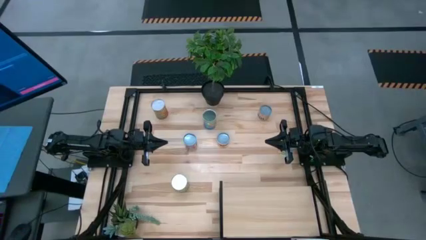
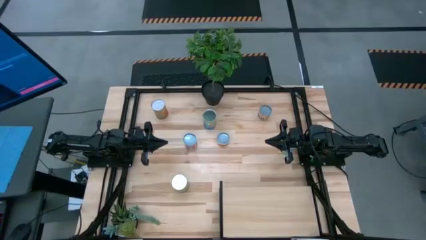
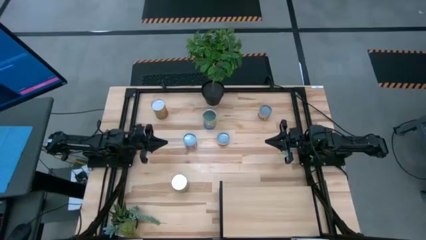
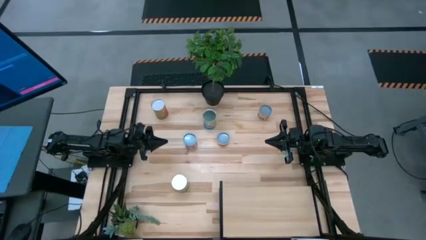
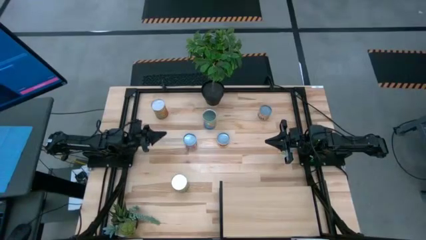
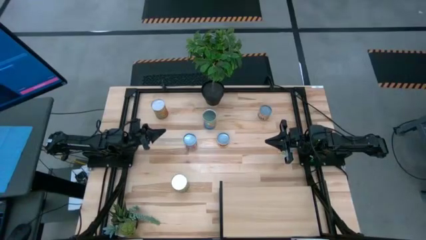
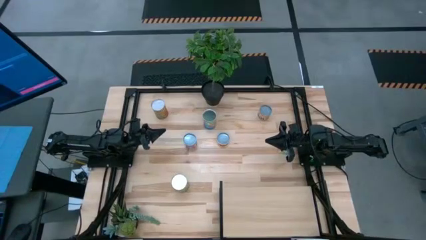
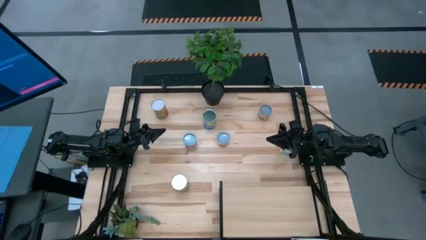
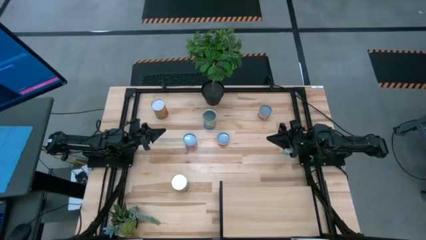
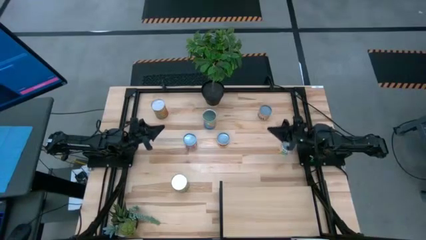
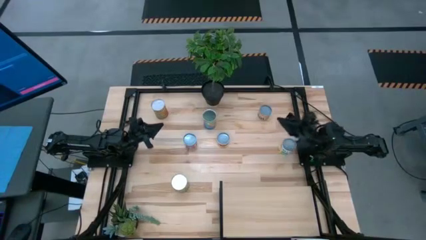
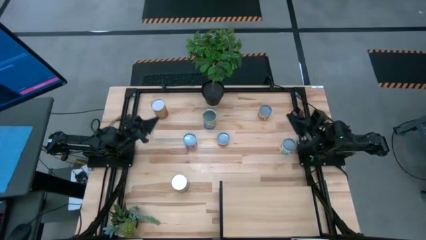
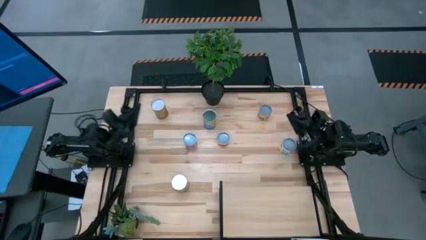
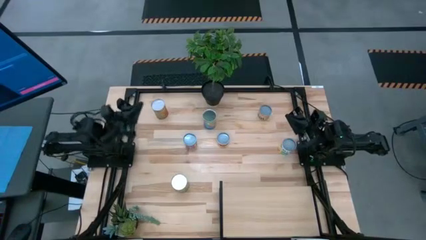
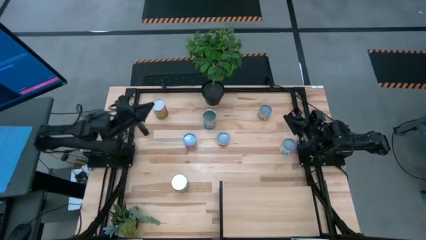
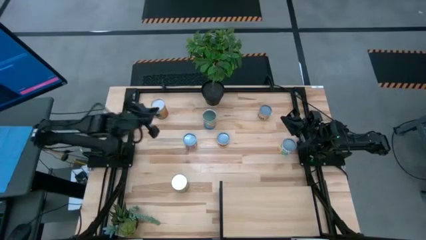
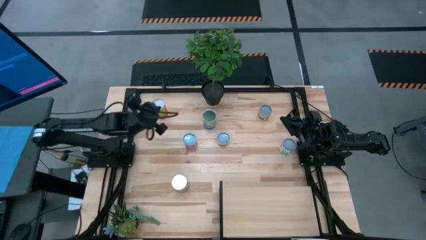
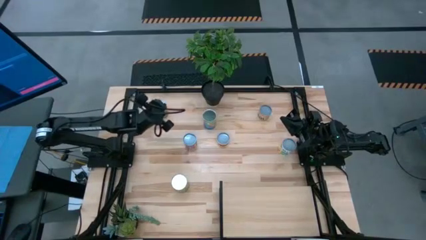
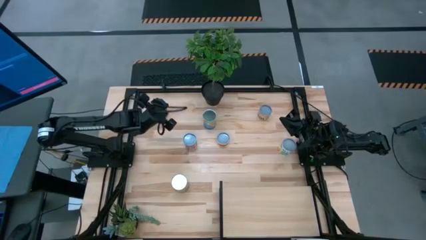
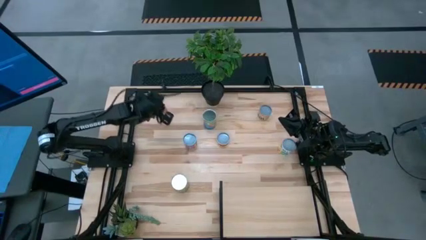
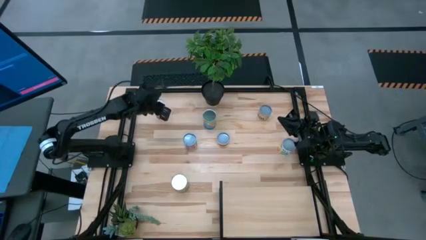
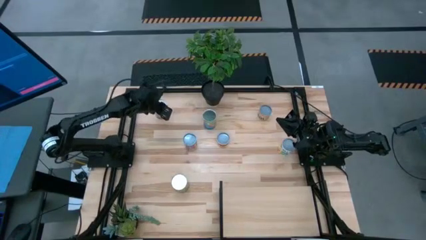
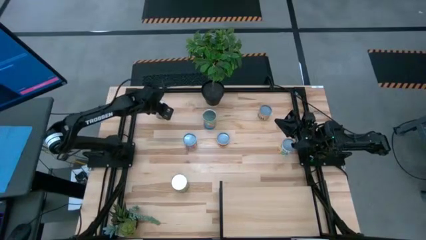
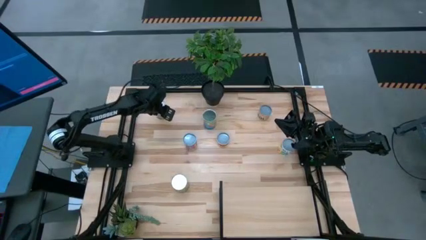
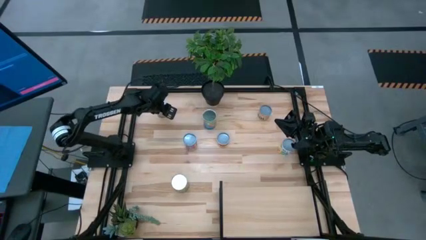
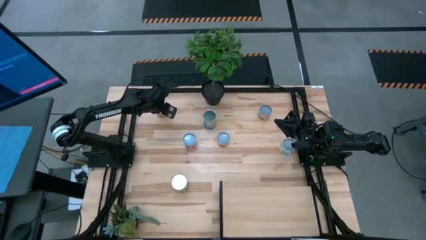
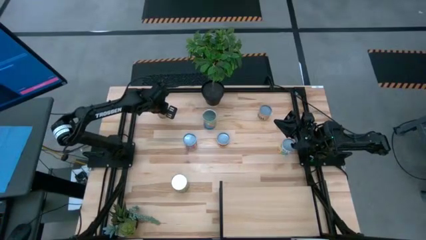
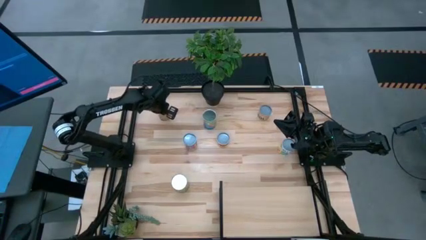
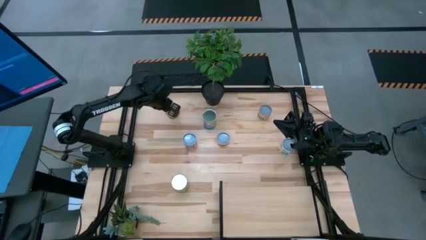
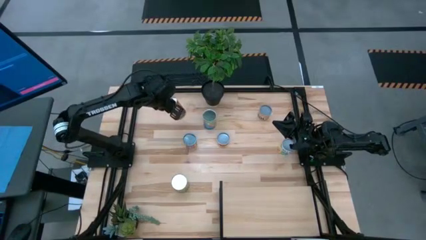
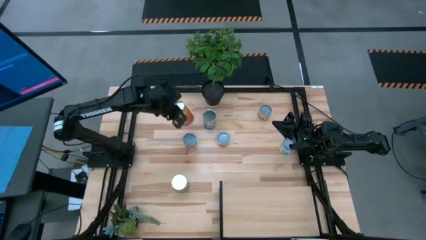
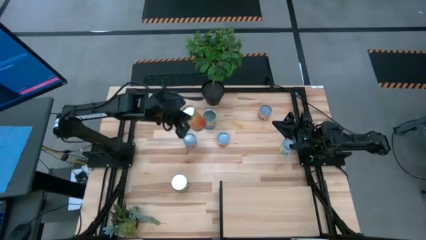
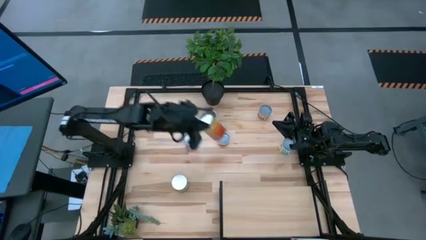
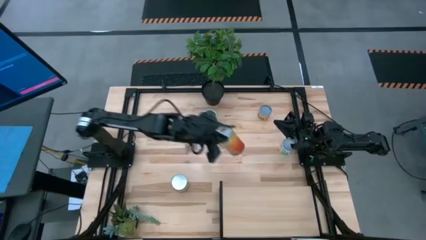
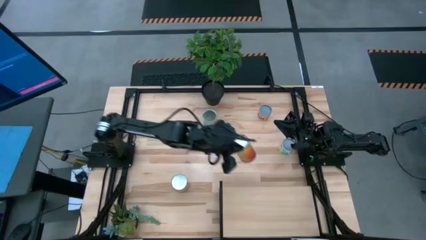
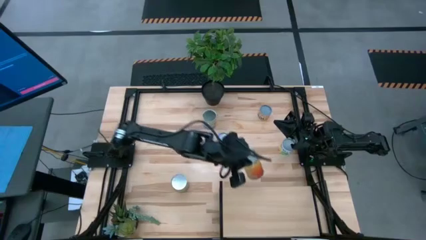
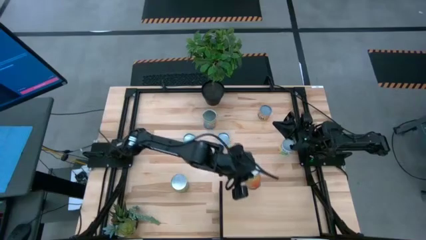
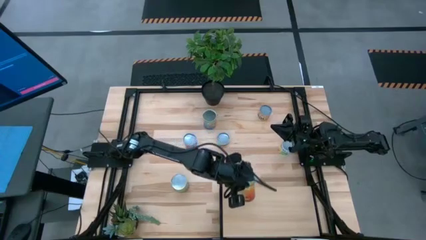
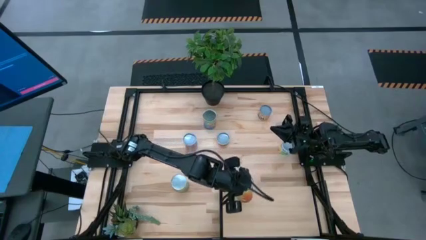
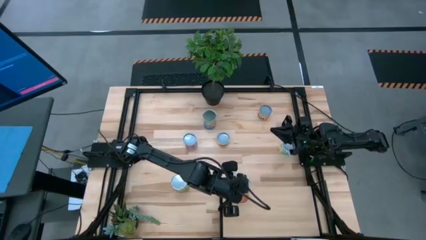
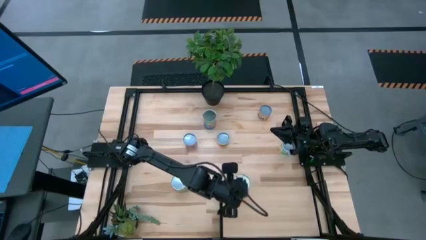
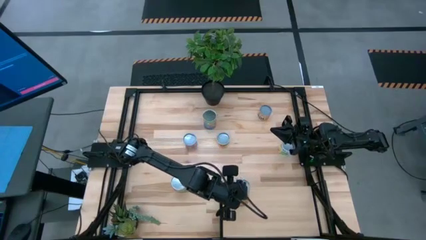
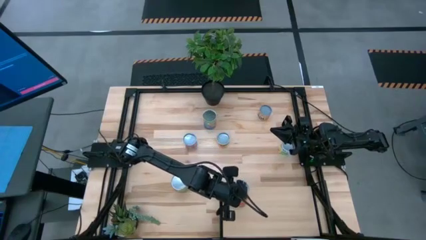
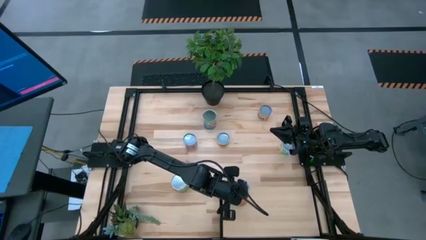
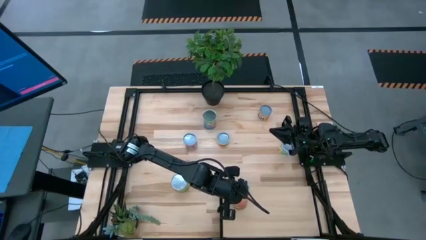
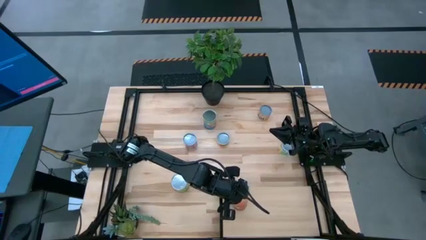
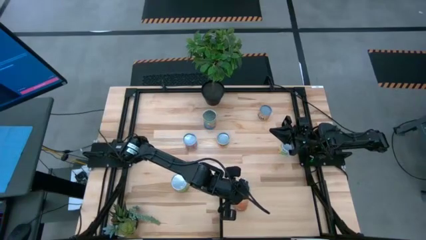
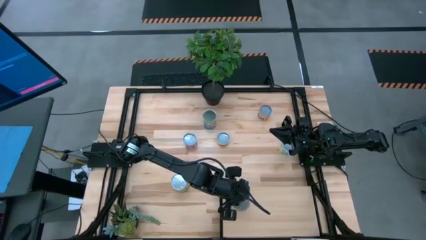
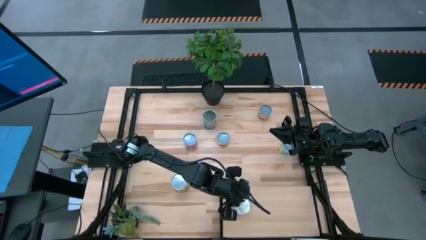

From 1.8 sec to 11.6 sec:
Task: Pick and place cans onto a shelf
Put the canned green beans on the shelf
